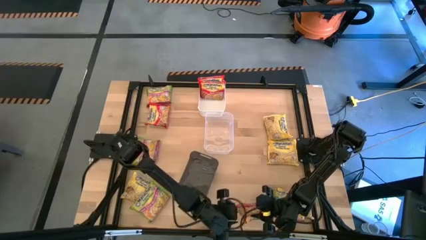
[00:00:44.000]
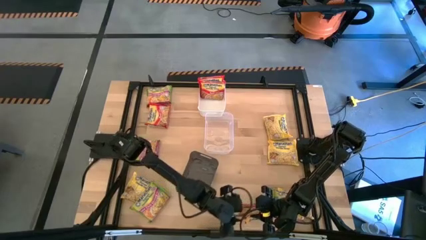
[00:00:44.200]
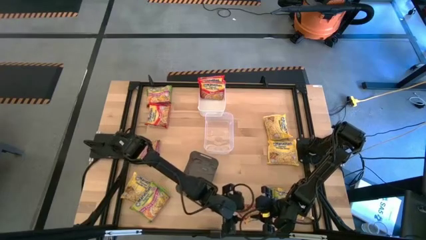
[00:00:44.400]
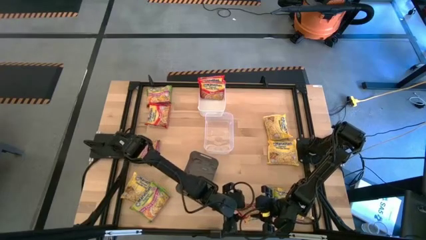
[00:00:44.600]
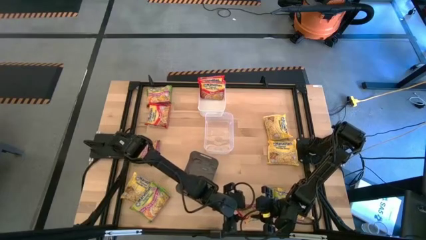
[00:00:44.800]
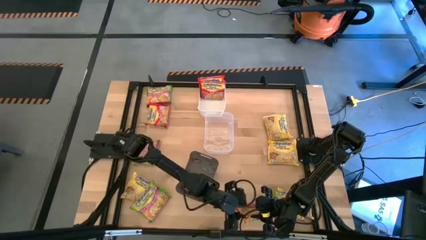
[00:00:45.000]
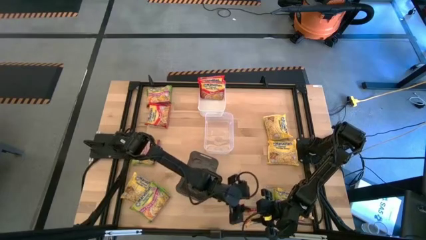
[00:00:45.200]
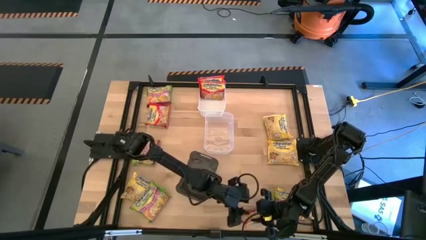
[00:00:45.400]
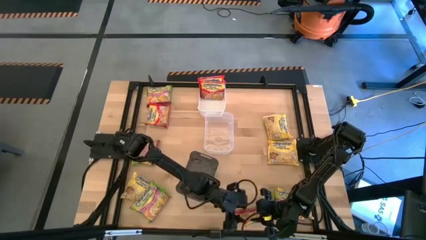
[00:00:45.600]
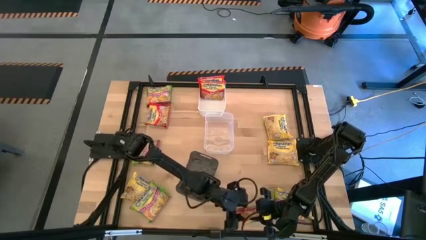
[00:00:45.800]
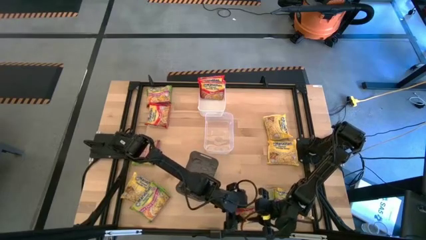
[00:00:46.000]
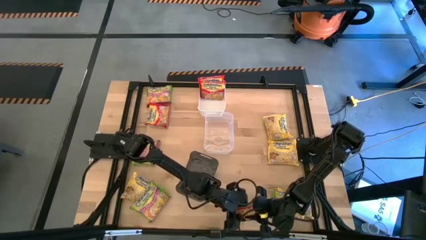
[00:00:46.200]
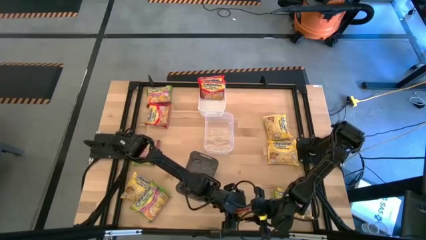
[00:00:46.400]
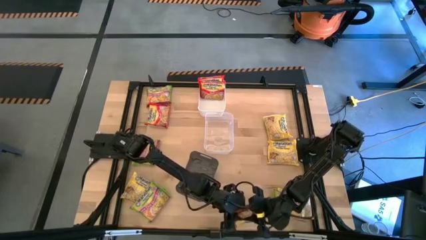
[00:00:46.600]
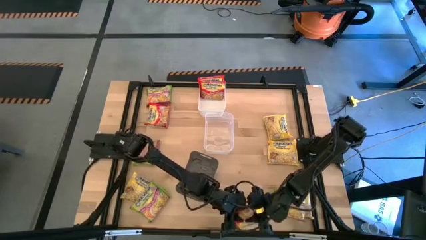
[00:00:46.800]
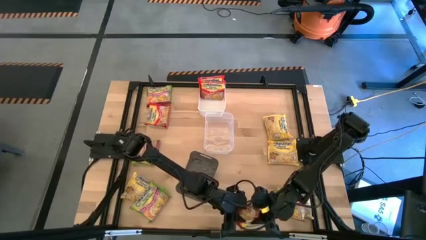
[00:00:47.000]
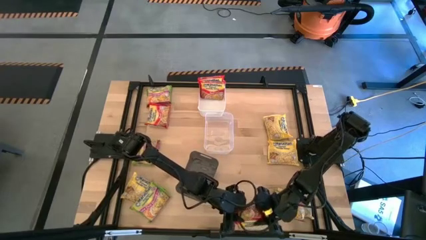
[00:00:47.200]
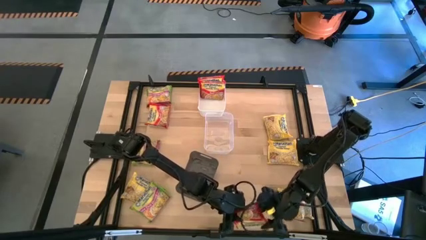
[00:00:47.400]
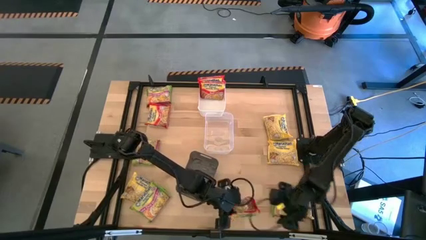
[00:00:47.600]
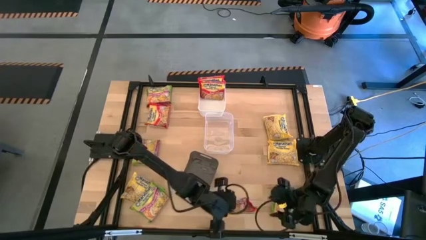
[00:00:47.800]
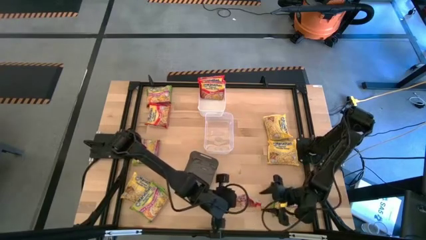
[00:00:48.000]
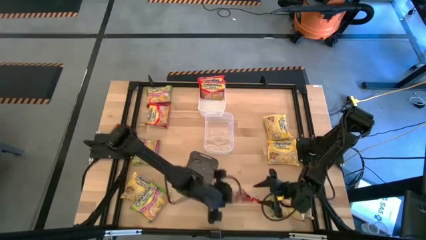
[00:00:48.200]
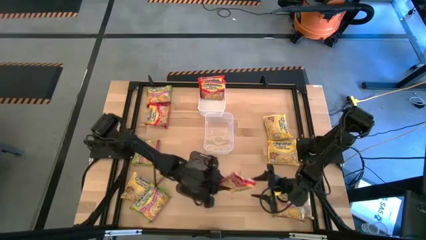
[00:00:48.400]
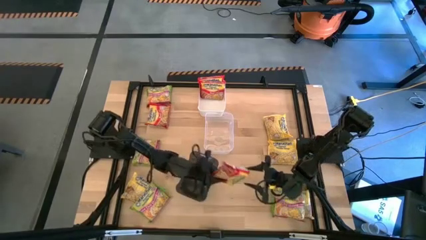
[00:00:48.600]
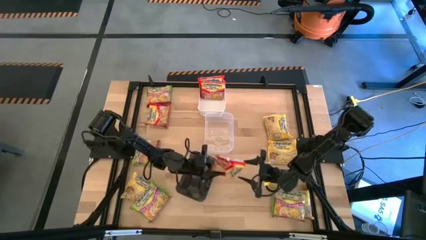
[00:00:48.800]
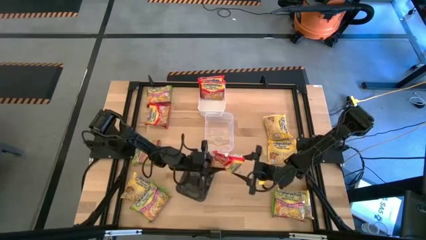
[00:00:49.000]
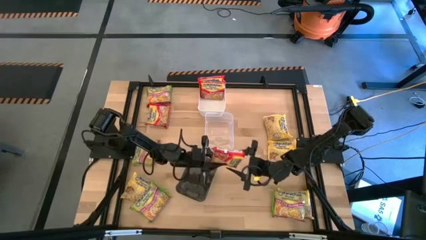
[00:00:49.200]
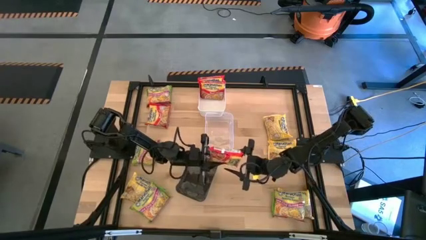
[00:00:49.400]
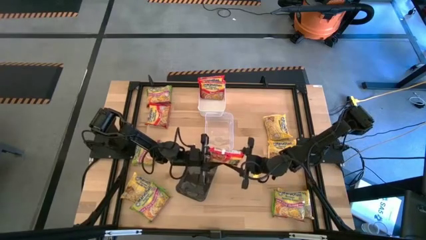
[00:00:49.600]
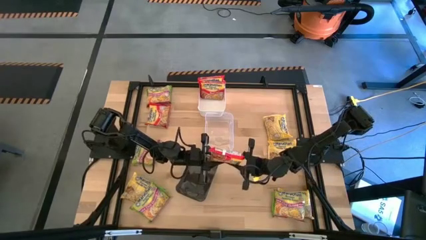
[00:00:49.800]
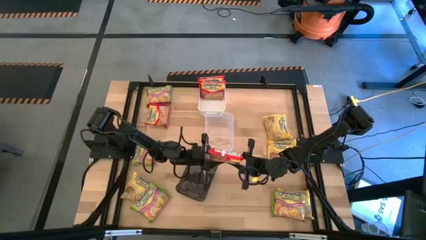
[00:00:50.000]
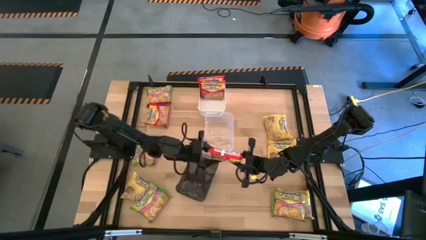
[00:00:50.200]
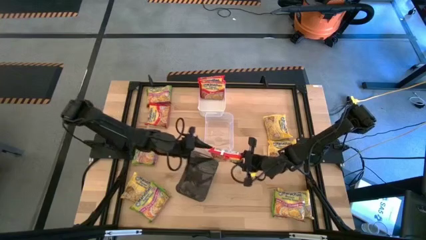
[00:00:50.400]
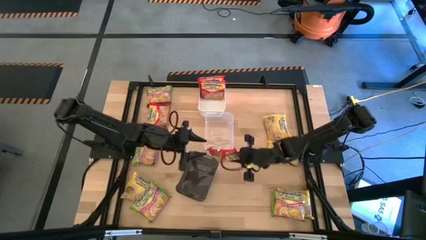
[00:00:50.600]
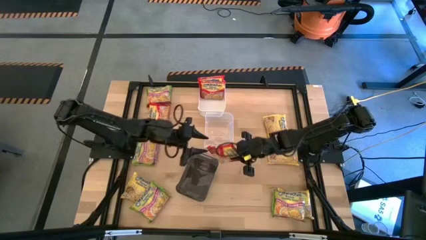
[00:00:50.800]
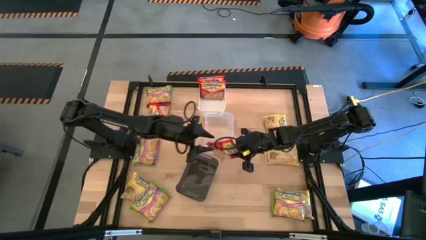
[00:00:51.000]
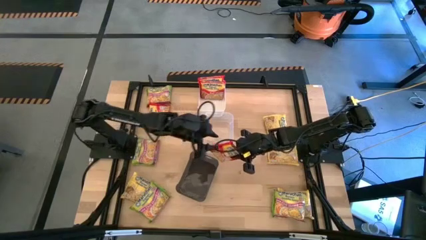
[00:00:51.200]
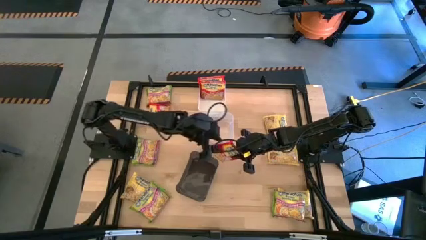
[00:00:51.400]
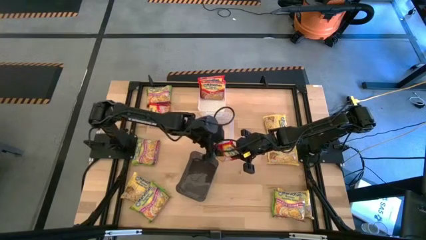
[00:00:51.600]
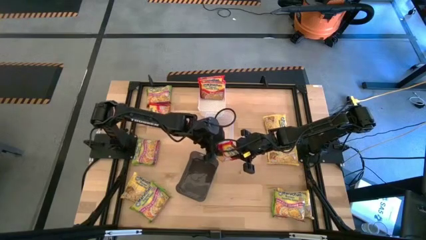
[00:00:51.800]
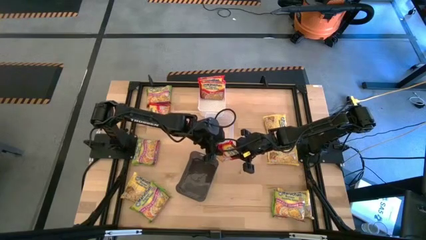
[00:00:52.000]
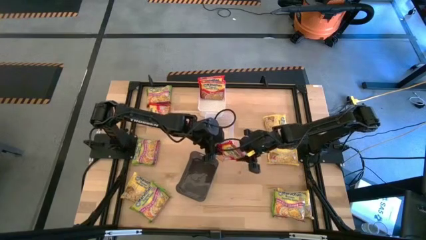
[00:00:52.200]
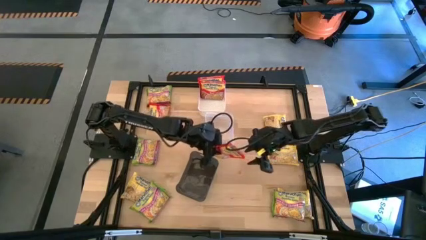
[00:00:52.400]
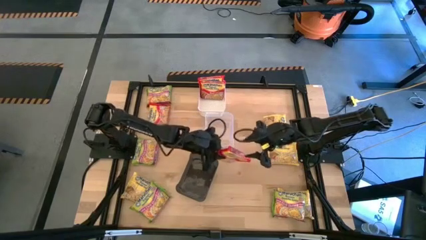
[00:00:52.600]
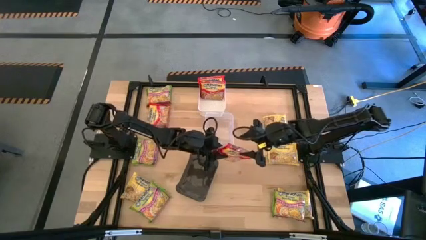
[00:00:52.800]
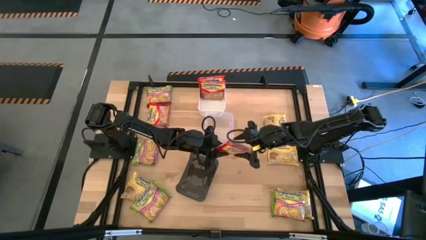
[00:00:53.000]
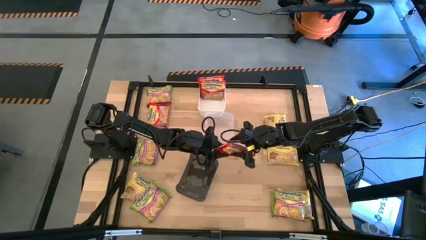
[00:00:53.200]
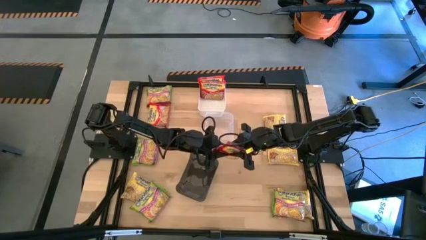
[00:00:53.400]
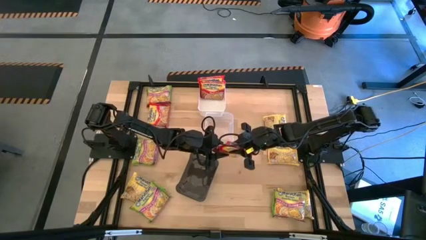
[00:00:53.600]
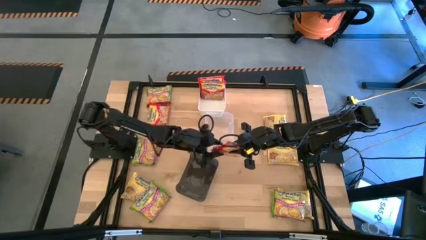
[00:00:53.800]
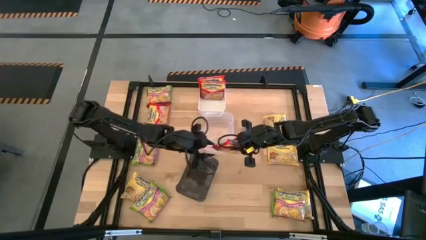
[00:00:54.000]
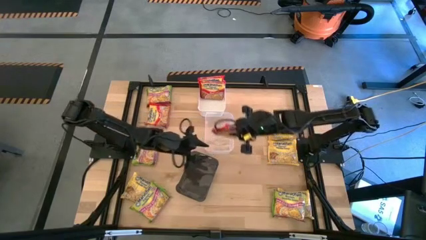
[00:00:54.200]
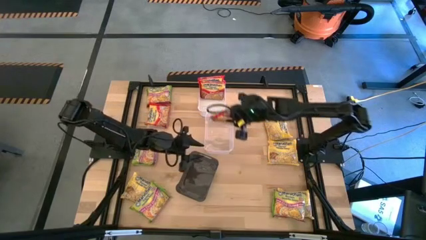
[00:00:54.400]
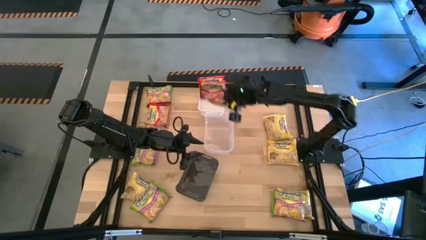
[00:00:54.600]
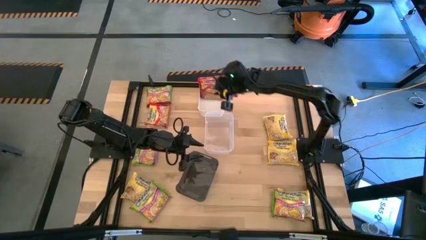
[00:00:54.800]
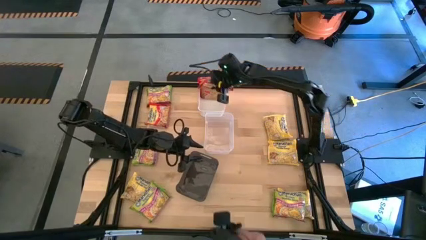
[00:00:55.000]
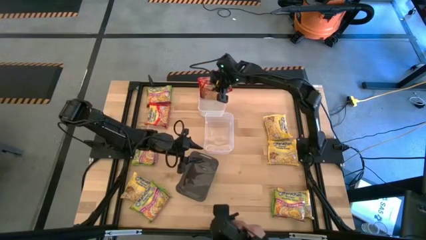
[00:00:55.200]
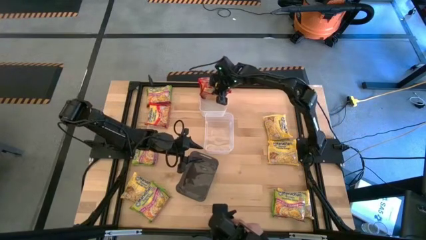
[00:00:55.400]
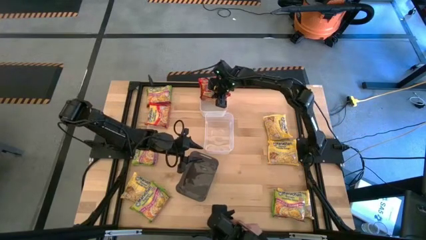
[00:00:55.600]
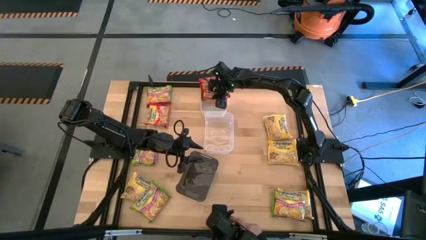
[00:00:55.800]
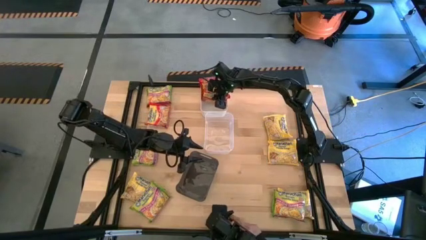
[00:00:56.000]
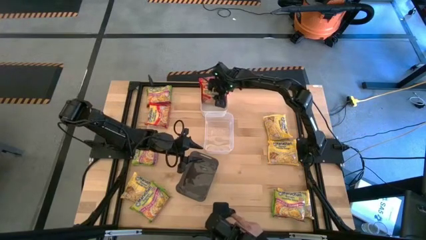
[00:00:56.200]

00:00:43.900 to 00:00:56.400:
Task: Sort Maruchan noodles
Put the red noodle pack into the white bin
